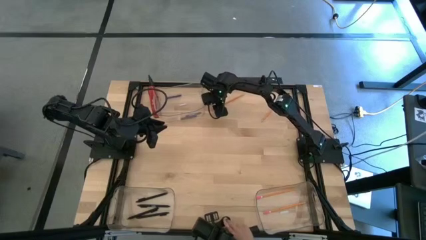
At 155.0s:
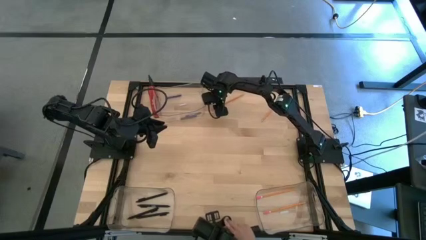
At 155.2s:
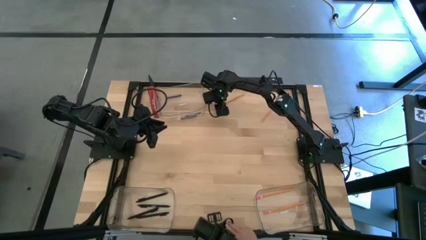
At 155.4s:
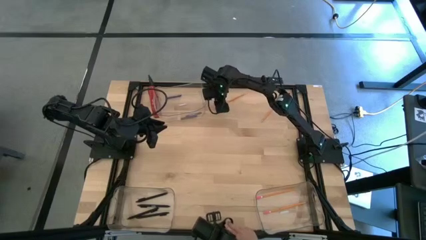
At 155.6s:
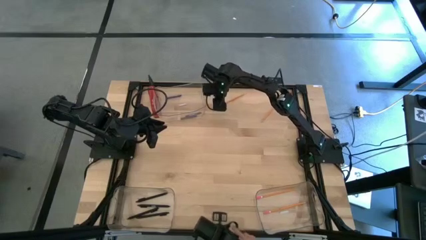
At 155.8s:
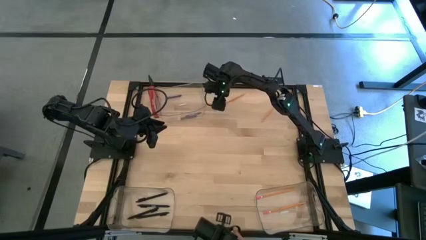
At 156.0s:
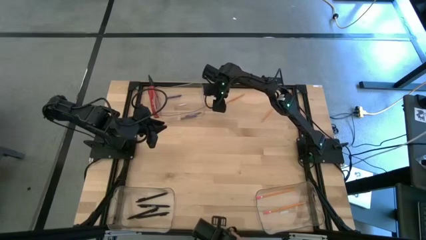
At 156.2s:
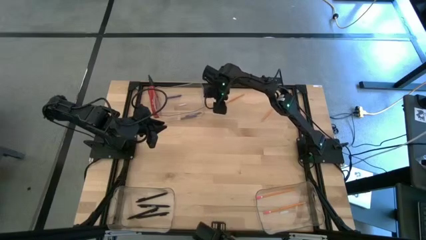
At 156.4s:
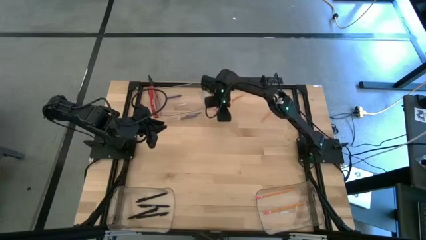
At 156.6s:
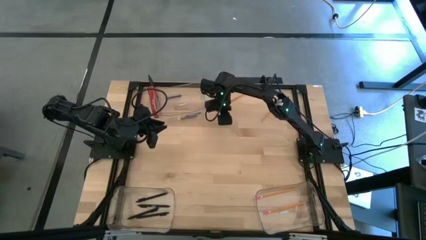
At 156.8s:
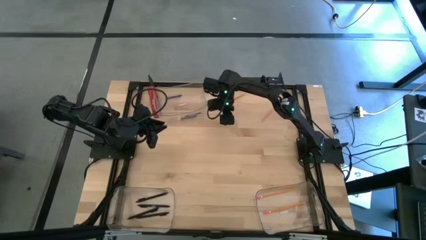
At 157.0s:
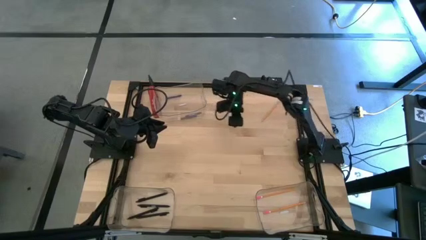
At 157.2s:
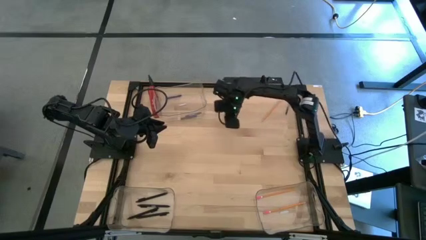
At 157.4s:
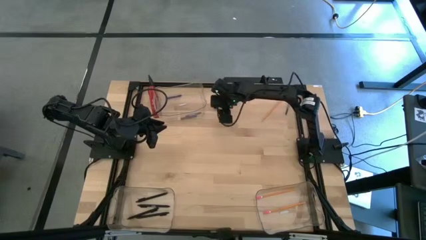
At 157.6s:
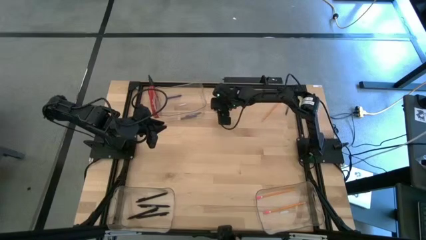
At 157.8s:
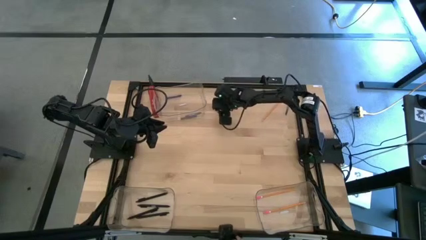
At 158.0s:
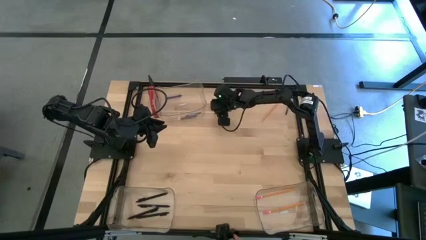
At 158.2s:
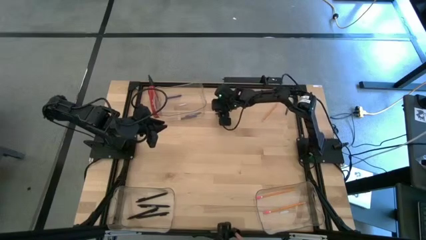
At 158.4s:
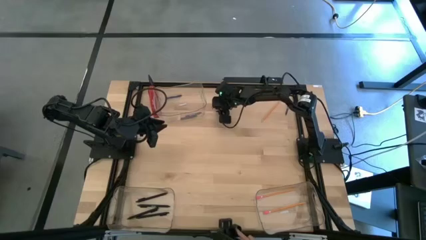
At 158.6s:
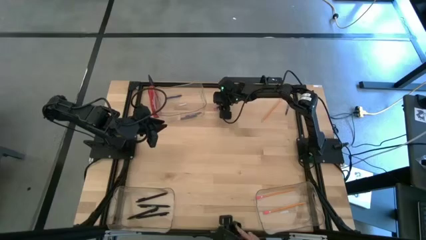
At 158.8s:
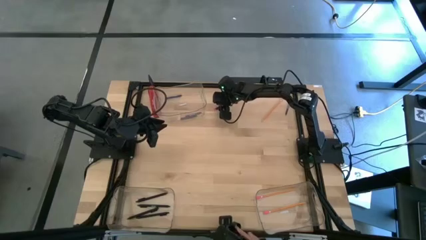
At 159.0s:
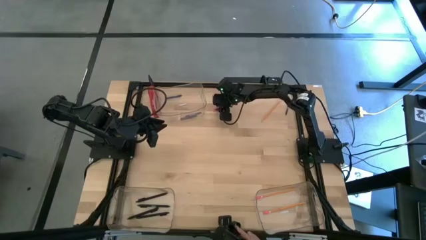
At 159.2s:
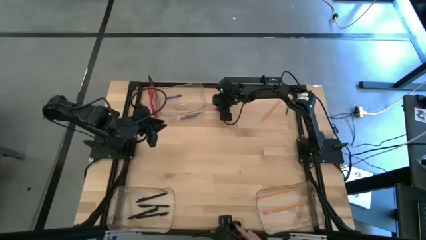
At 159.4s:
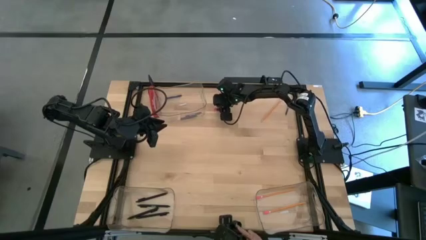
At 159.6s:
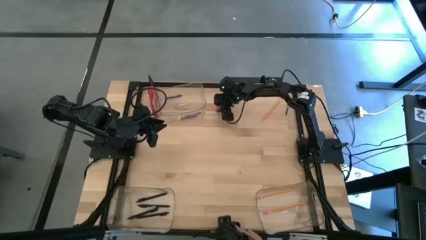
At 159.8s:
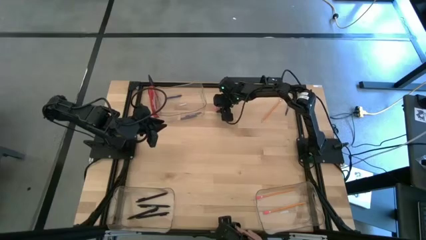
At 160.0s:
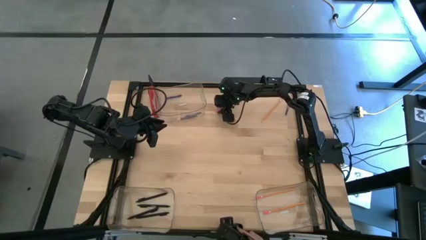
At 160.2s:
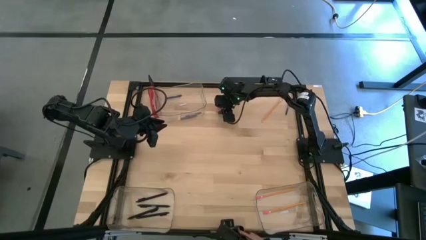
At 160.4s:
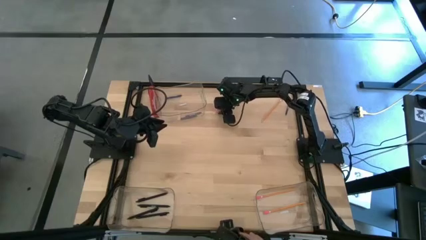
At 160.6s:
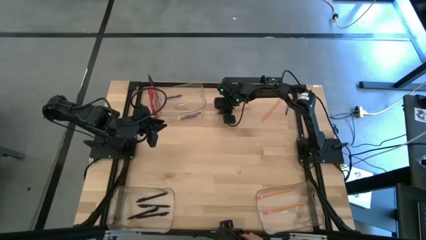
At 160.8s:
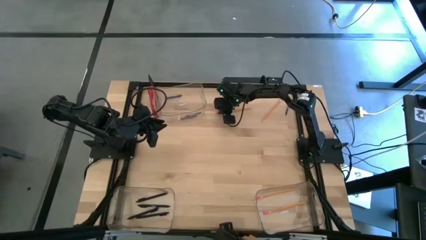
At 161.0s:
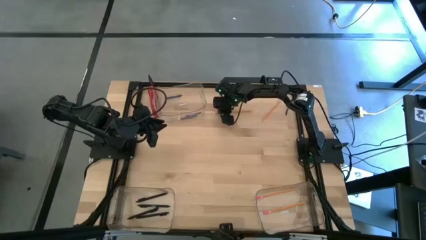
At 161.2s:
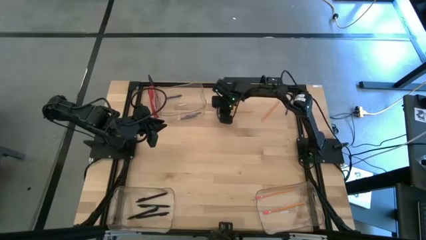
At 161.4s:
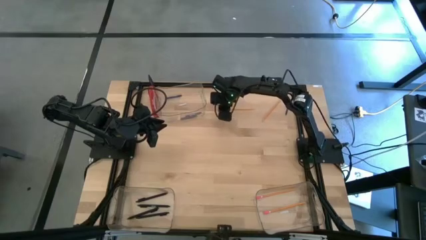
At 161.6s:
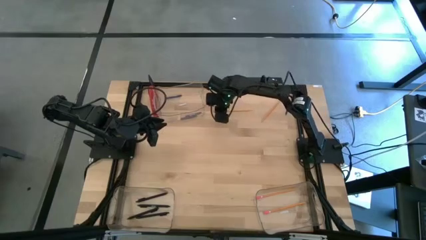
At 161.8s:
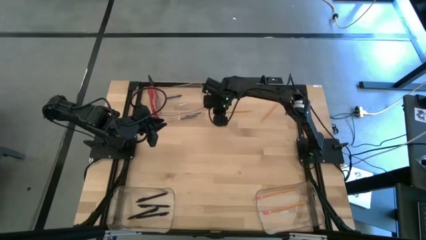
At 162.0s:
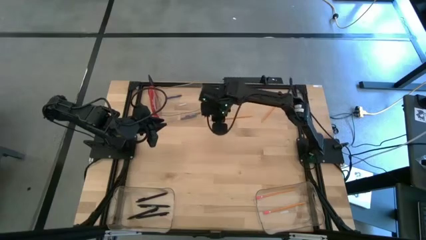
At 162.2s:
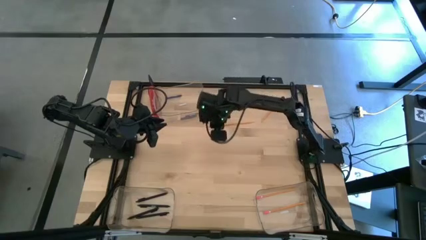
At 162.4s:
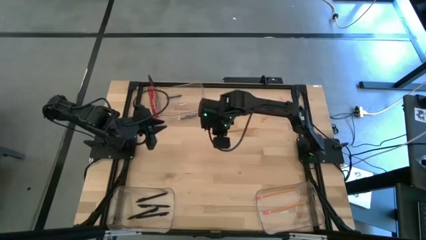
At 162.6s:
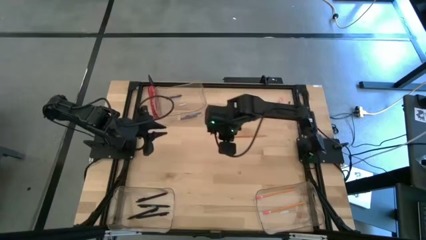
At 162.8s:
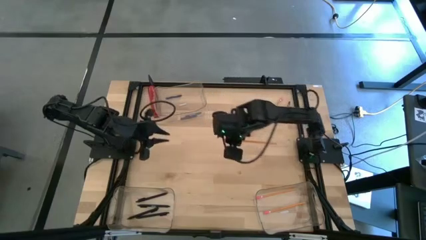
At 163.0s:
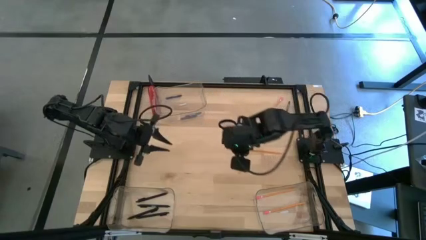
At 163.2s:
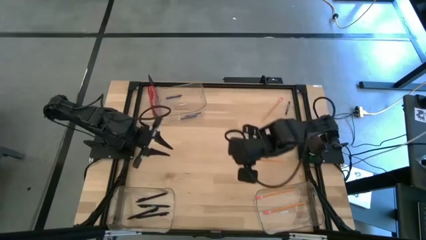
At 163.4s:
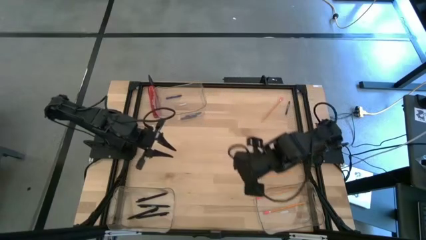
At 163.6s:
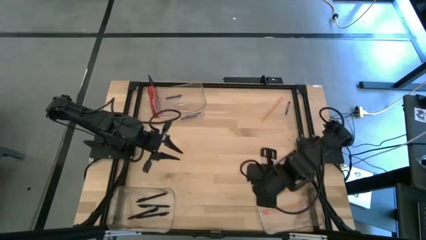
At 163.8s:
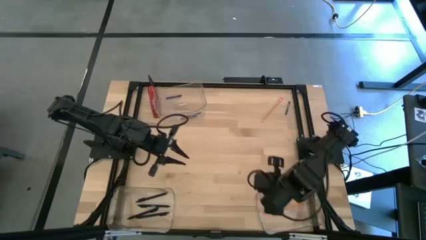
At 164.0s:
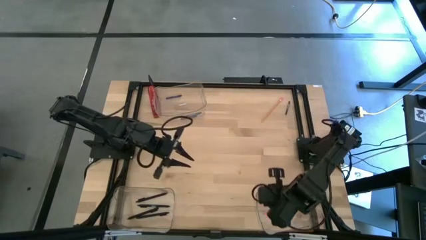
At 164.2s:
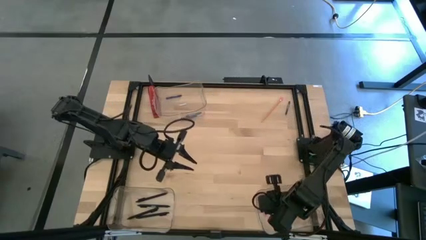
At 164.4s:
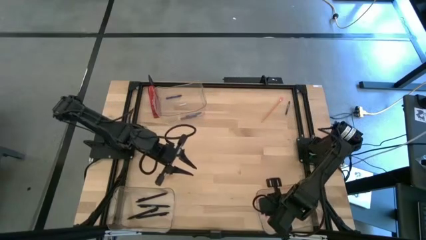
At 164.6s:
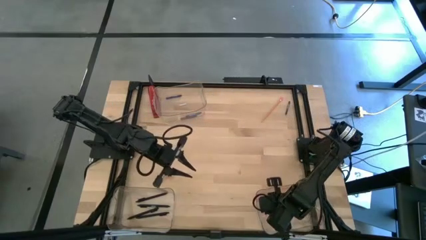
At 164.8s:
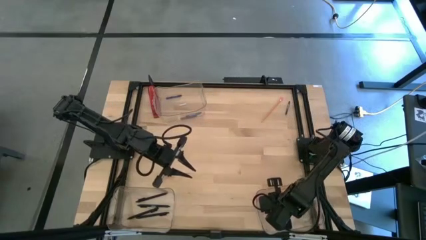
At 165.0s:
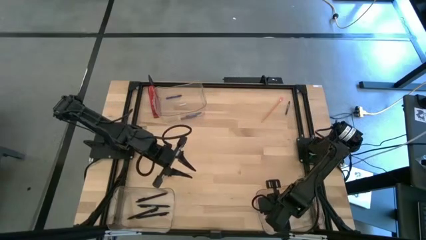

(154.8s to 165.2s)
Task: Sort crayons/erasers/pens/pencils in bins
Put the yellow pencil into the bottom right transparent bin

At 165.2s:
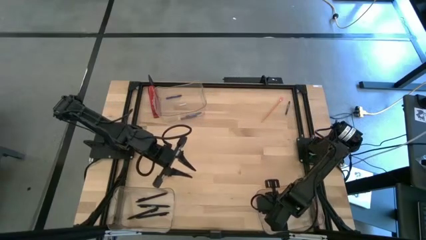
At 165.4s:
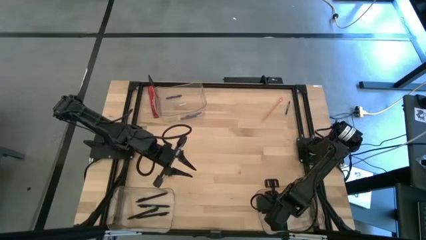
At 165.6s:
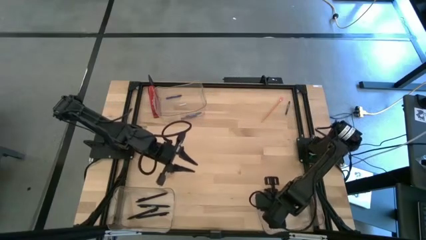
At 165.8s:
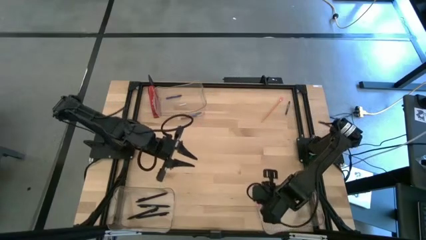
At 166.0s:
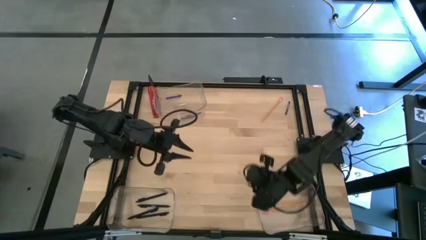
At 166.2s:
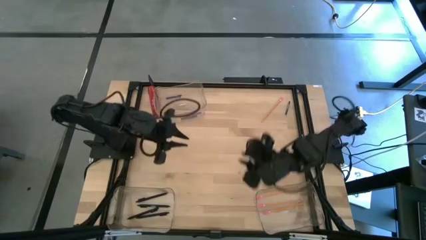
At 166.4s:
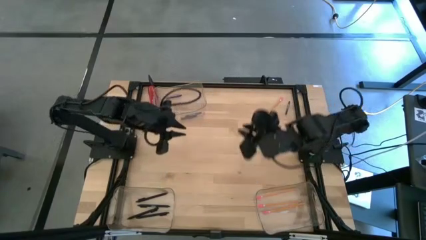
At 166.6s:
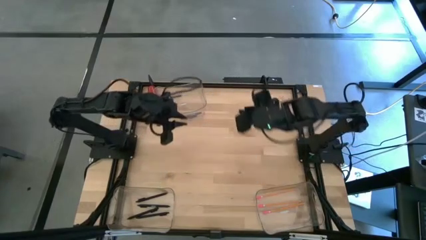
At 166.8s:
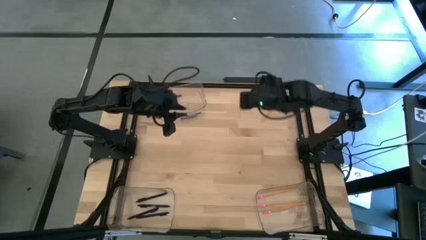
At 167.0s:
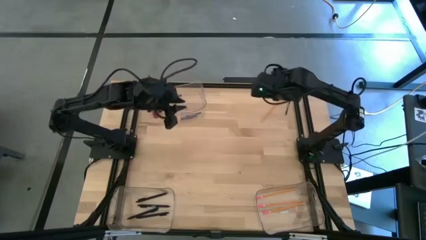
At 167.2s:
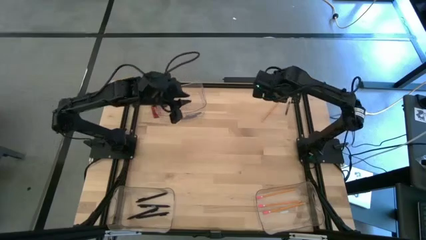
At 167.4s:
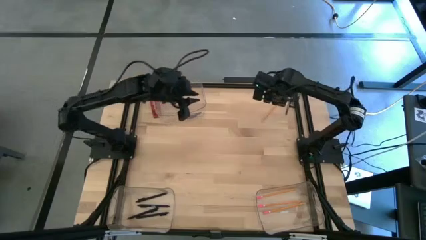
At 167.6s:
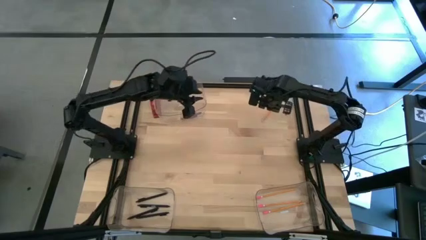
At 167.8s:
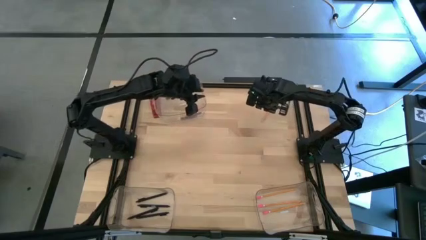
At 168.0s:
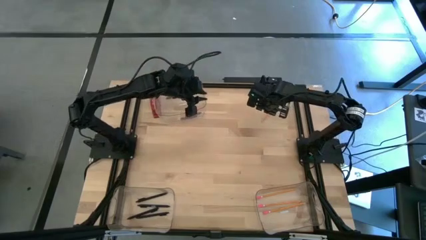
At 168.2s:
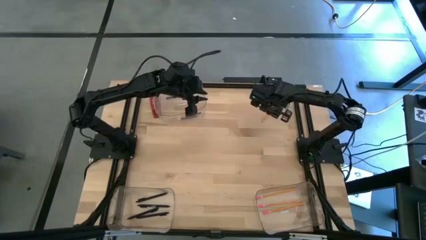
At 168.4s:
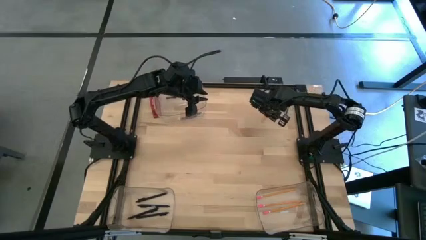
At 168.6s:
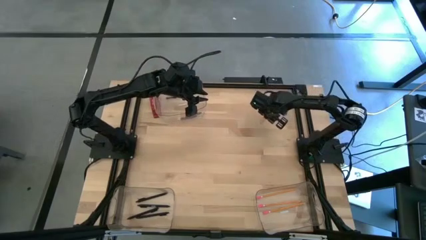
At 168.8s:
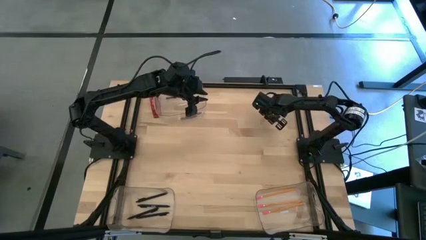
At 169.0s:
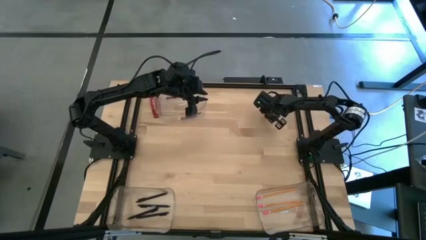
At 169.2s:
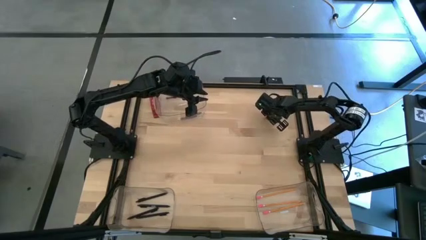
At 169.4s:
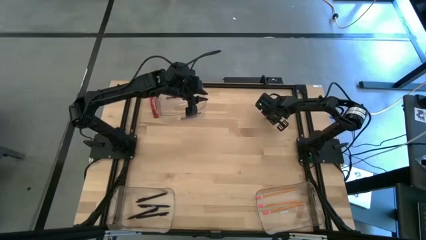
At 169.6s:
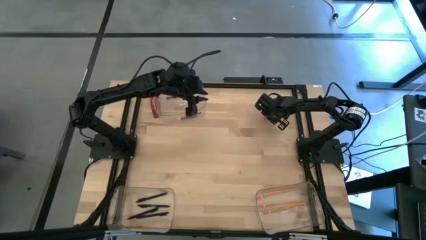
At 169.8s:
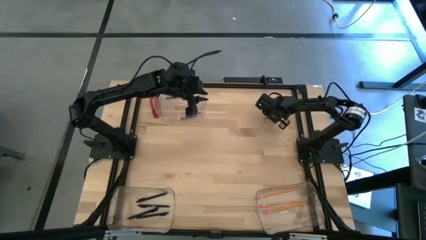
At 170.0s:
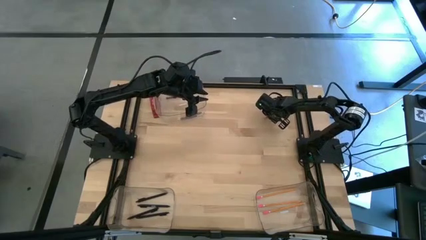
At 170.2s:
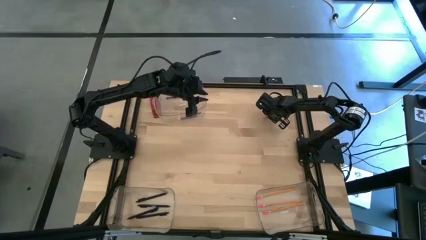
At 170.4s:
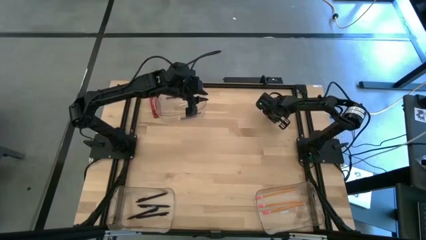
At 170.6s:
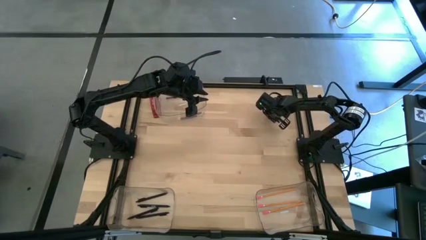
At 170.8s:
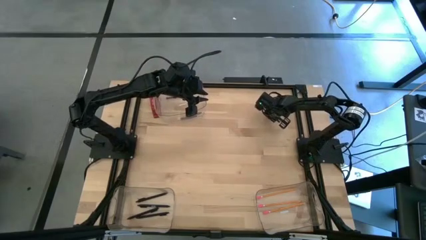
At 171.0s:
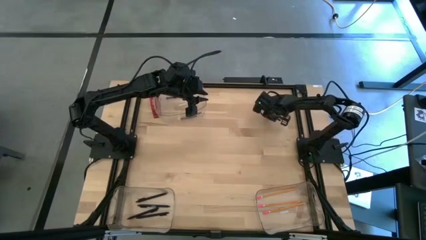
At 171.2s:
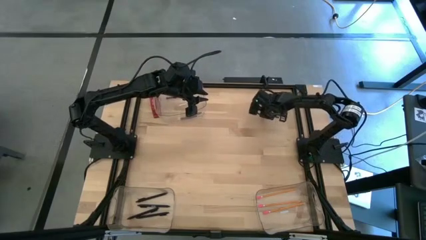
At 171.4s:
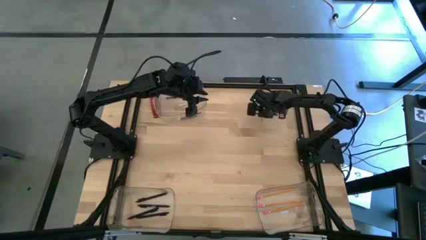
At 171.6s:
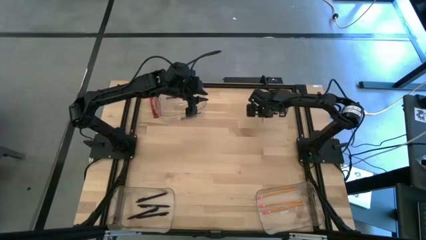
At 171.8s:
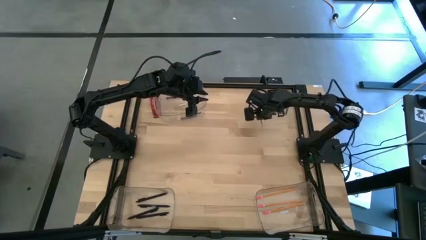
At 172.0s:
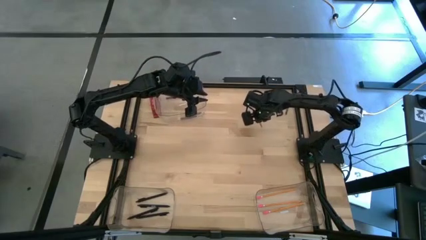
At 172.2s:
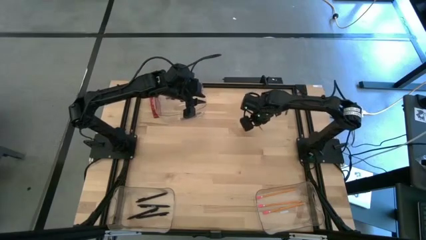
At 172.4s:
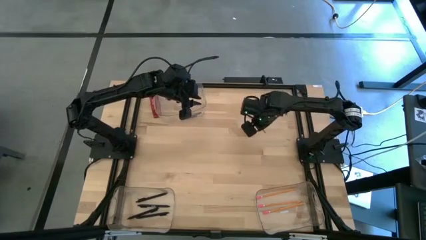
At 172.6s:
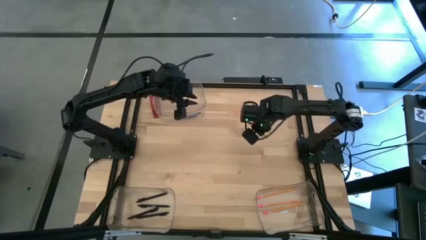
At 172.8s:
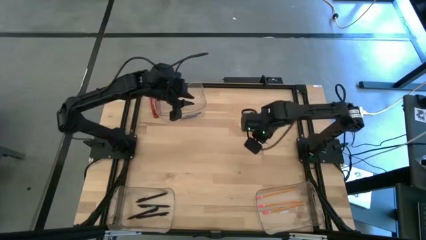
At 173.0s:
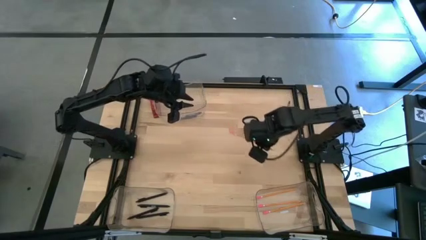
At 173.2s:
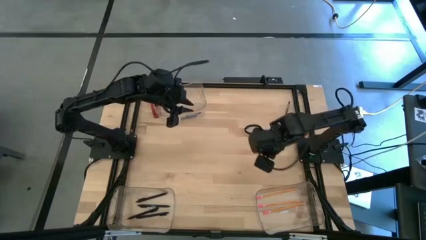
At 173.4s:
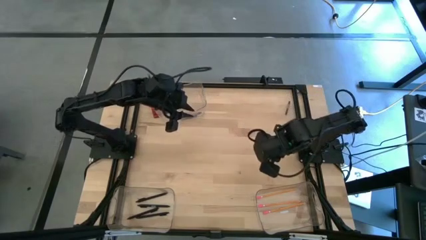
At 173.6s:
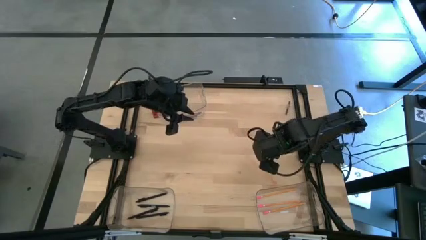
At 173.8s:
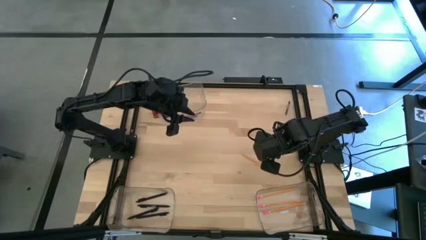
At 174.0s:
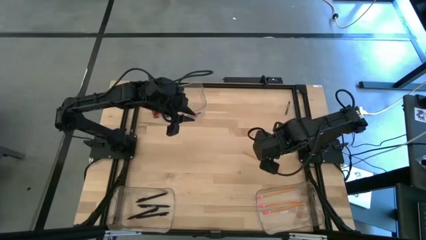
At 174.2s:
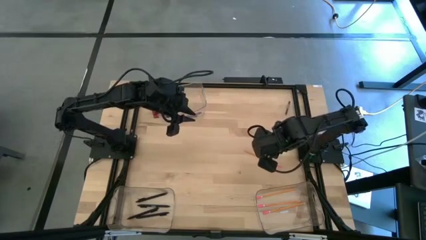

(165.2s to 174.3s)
Put the yellow pencil into the bottom right transparent bin
